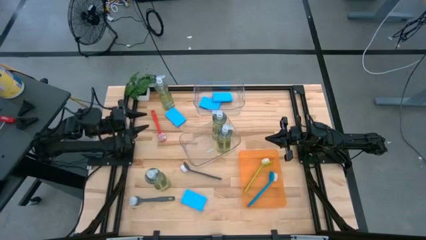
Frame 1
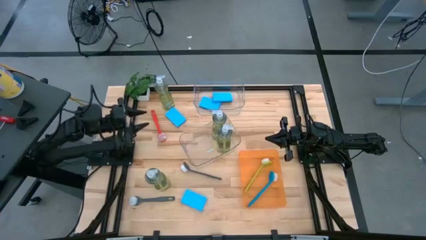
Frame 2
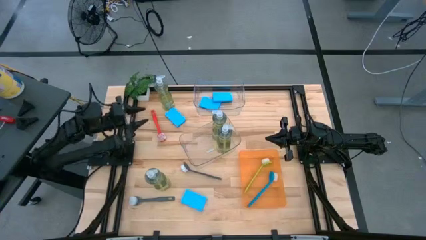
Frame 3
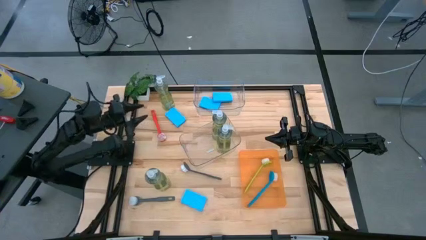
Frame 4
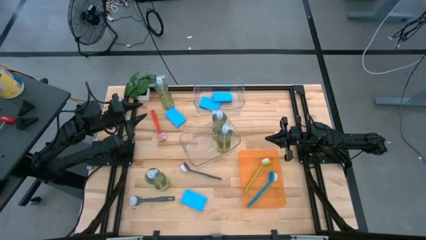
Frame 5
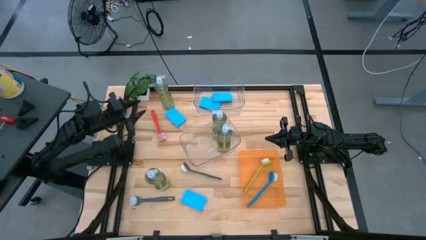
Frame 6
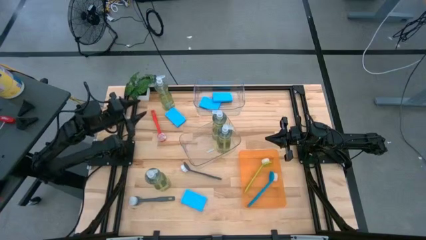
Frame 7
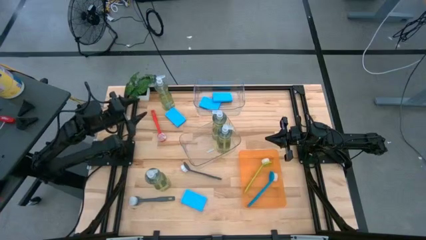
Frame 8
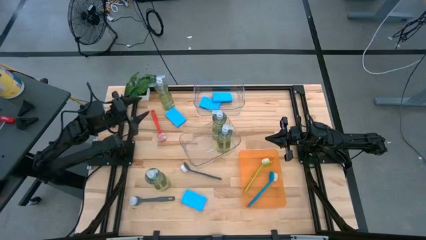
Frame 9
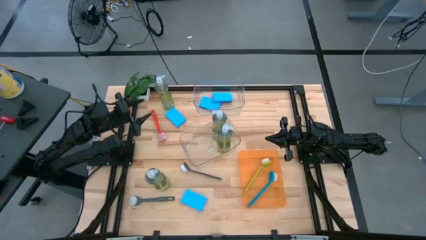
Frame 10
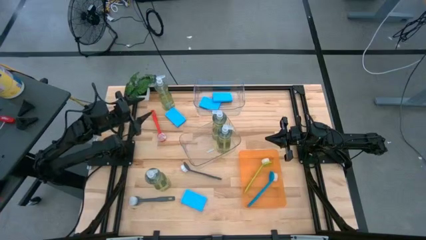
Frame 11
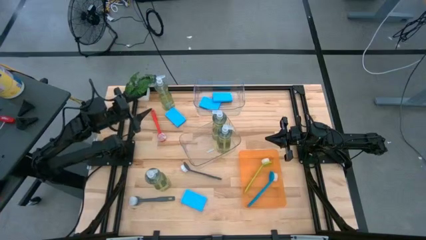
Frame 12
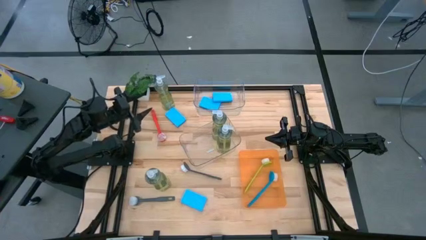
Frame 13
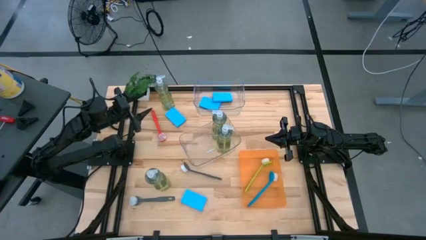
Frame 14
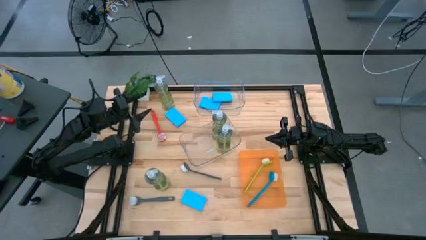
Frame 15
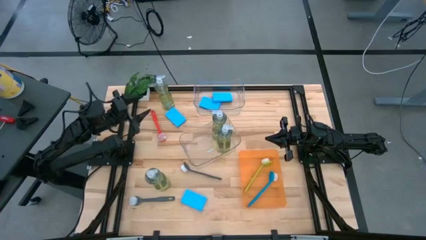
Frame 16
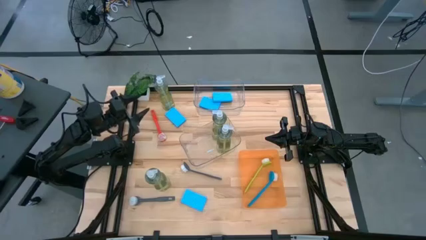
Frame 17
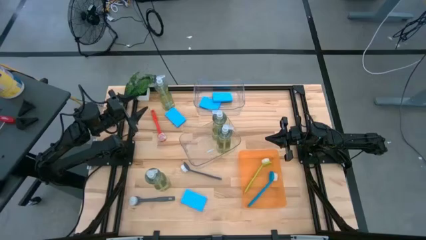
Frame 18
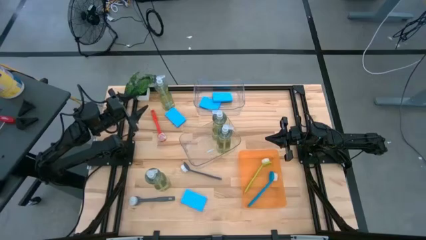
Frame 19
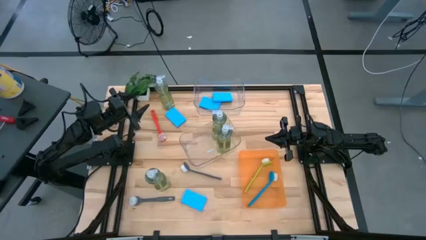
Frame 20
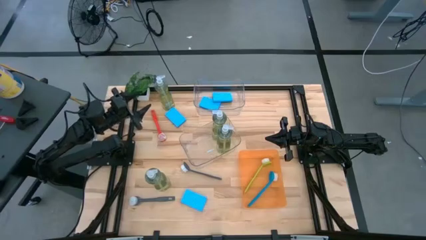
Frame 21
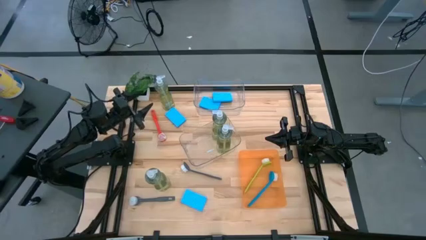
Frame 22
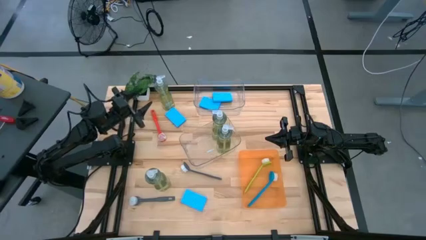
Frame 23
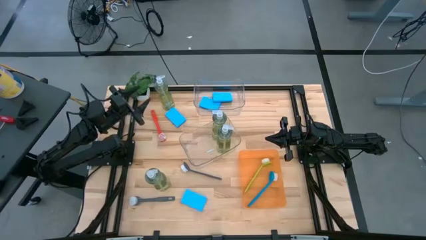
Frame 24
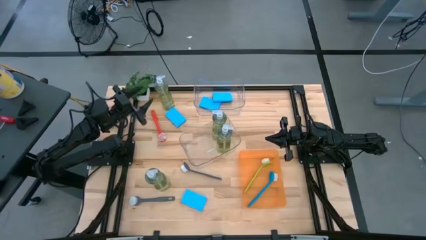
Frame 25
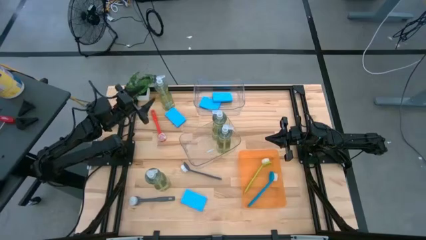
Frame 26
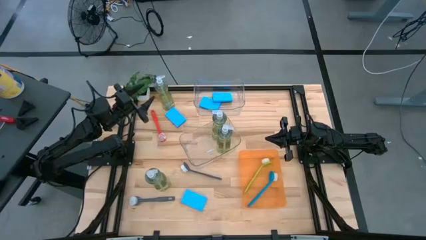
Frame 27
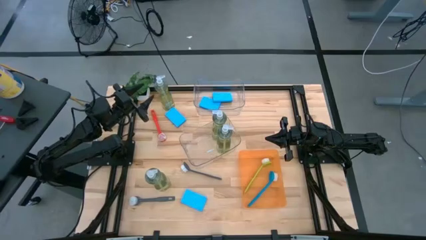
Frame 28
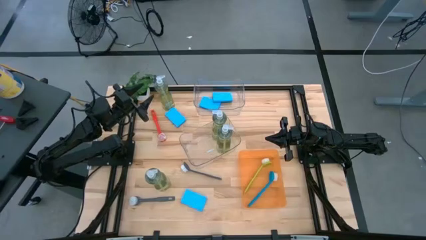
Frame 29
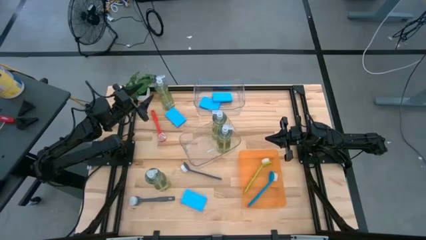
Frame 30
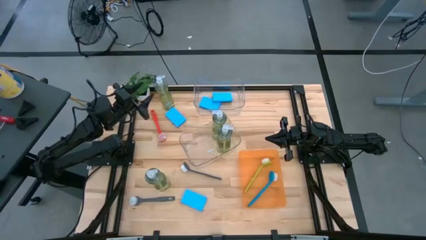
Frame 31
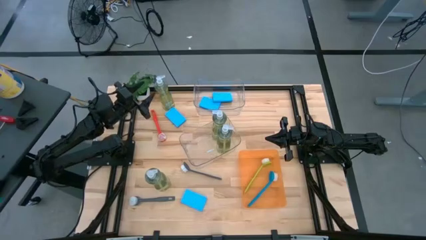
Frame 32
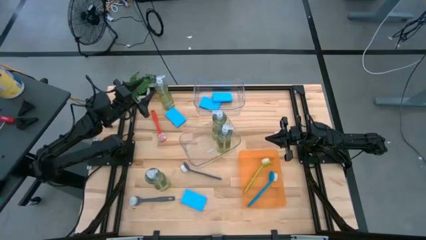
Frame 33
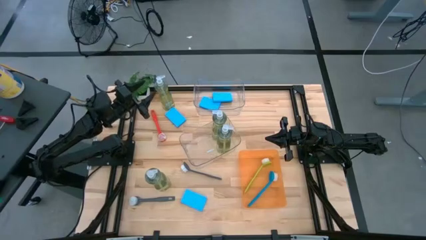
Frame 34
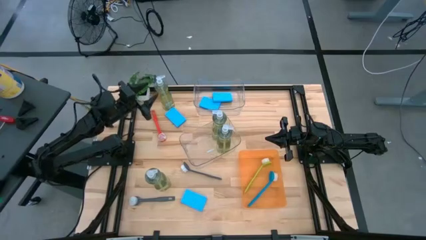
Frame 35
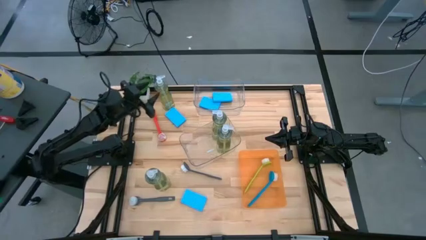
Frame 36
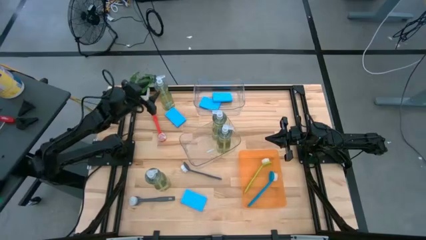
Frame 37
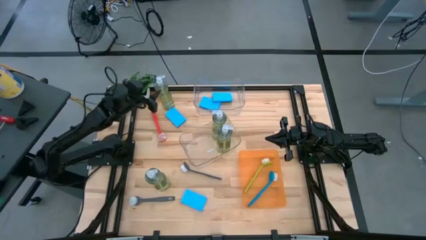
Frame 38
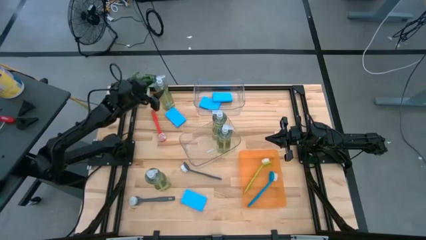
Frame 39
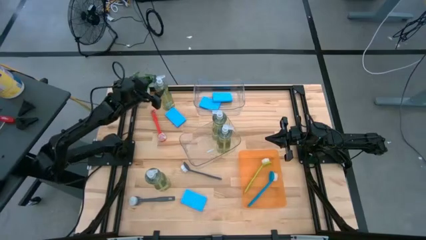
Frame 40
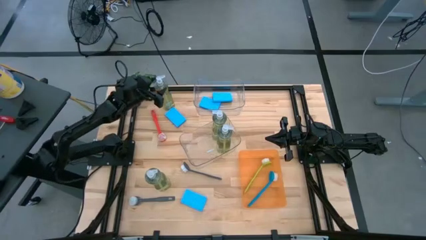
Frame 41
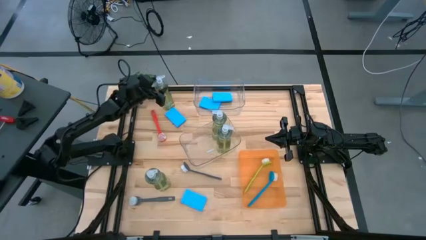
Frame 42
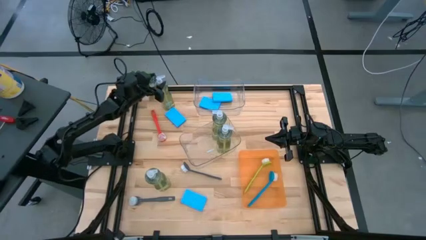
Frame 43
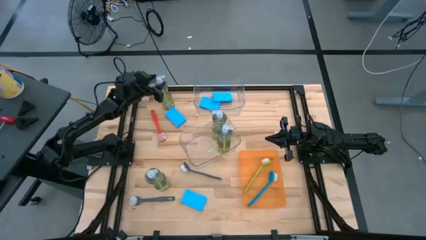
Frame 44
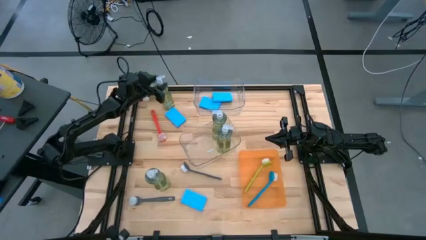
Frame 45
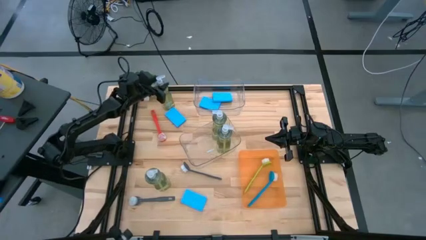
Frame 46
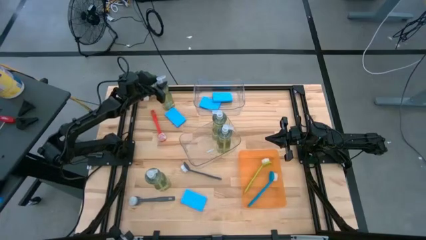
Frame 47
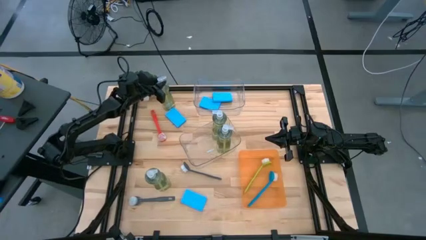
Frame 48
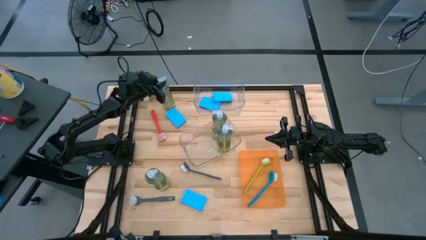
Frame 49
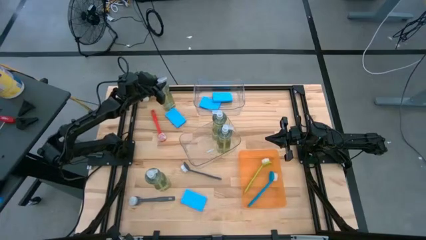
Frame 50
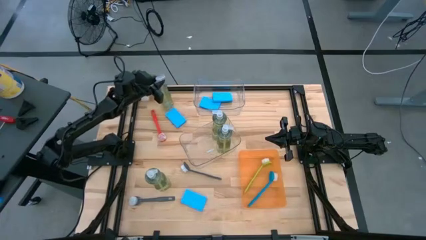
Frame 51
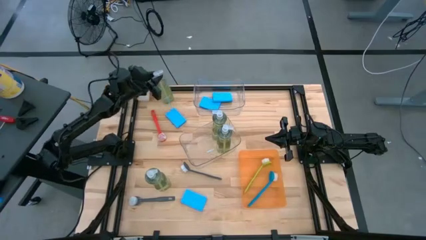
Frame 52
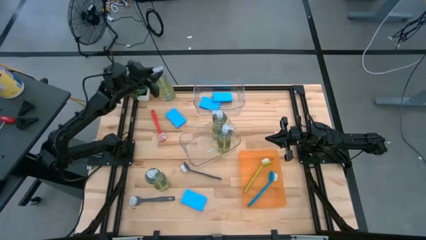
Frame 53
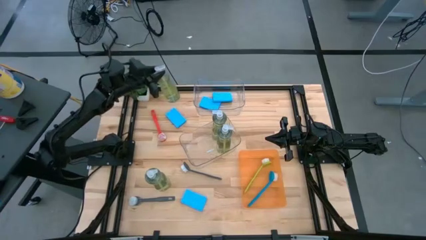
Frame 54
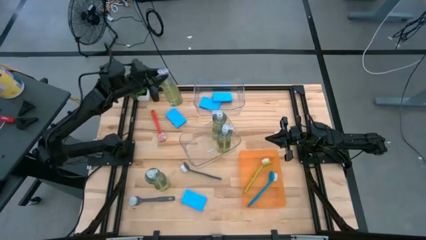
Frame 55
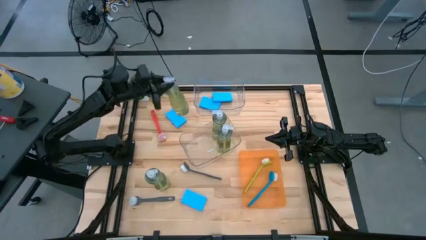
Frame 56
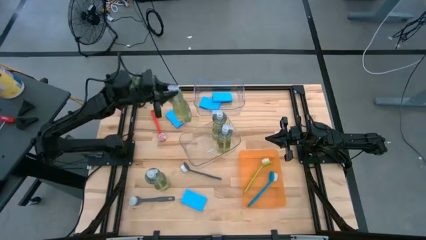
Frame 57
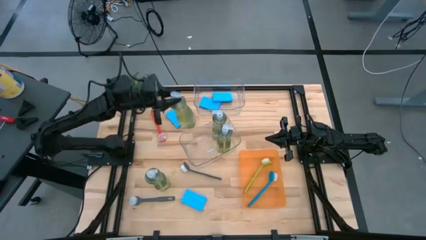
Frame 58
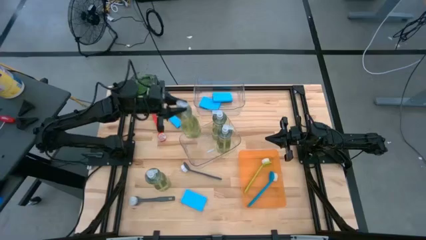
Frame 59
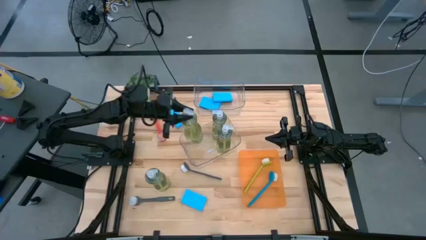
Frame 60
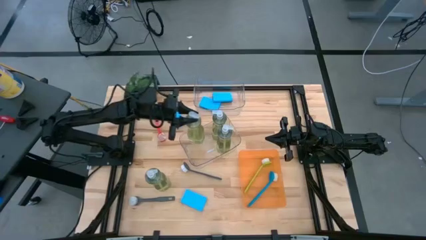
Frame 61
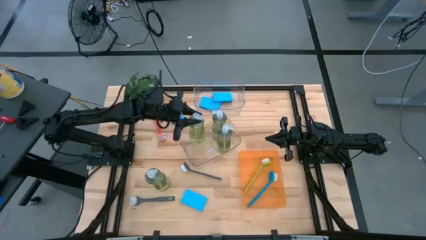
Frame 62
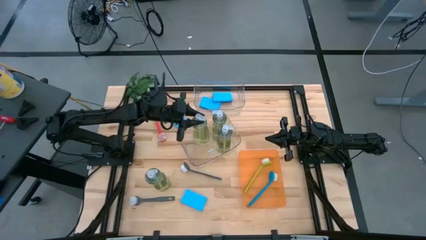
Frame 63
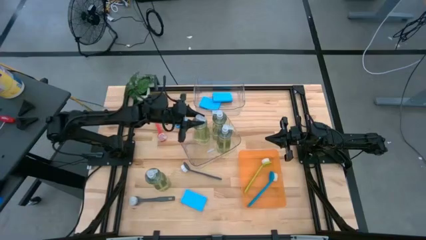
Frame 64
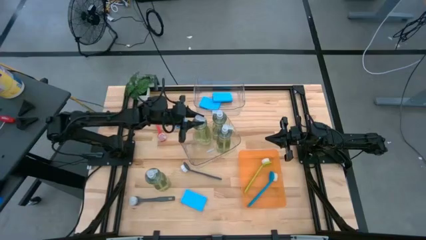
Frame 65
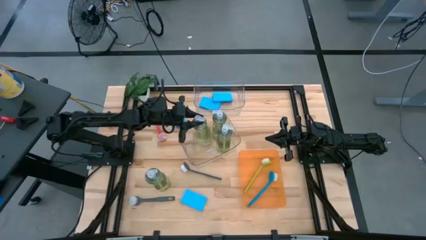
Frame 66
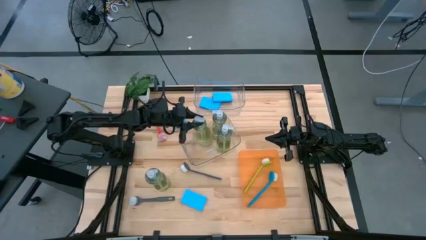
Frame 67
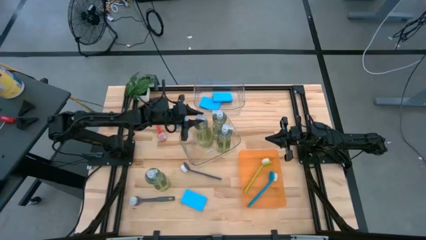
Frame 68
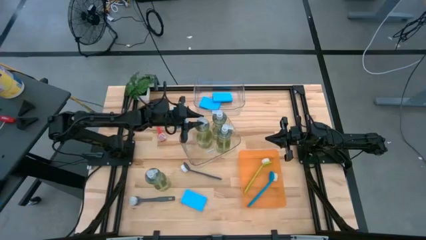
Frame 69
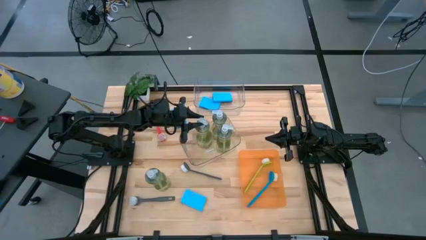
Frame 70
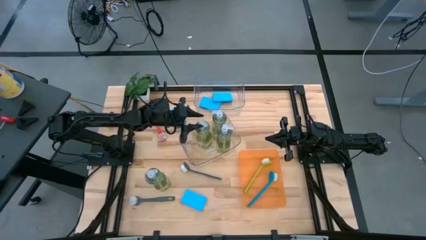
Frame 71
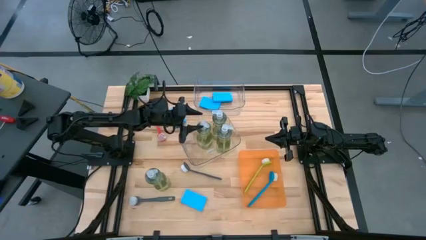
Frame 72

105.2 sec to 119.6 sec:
Task: Pick & Place Kitchen Sink Supplies
Put the green dish soap into the bottom transparent bin
